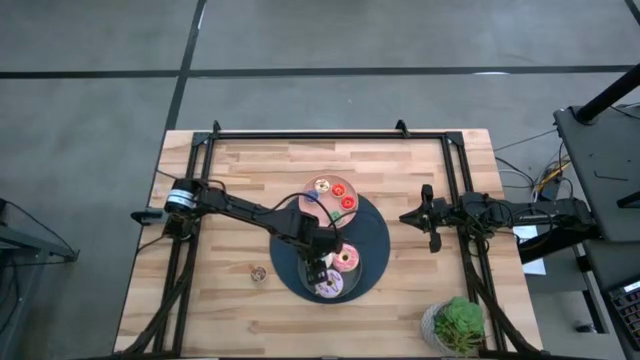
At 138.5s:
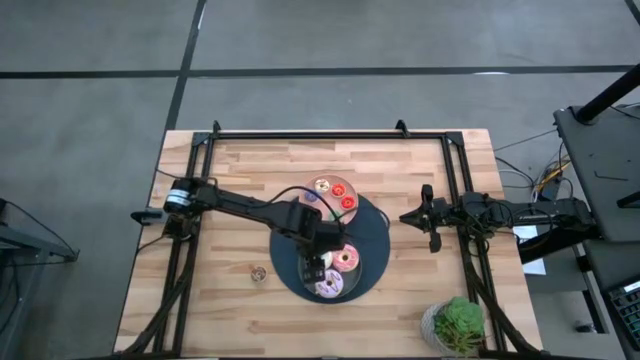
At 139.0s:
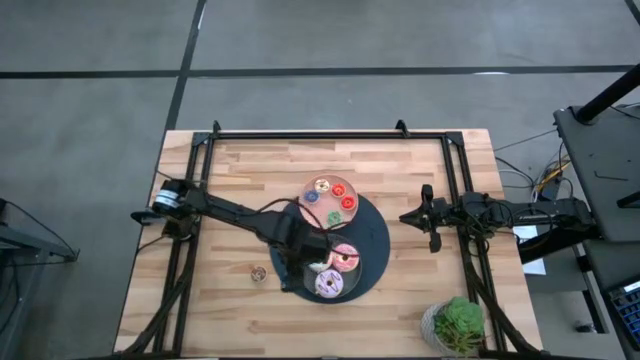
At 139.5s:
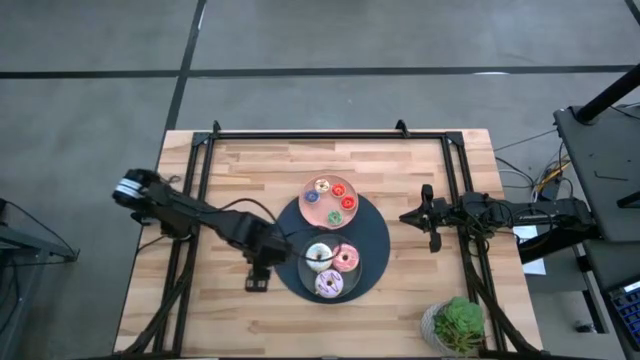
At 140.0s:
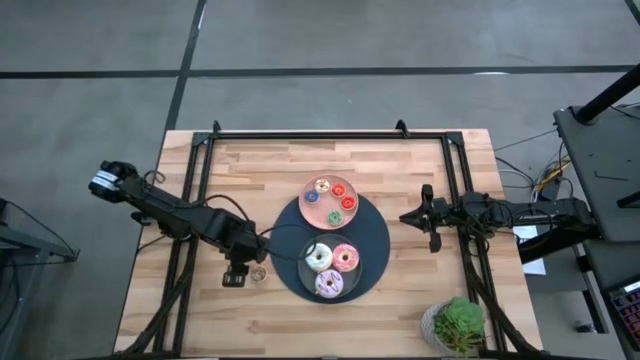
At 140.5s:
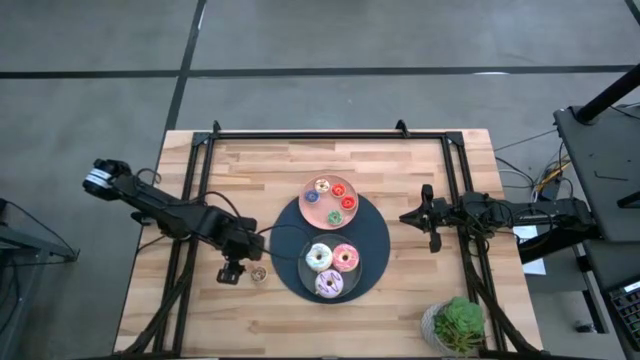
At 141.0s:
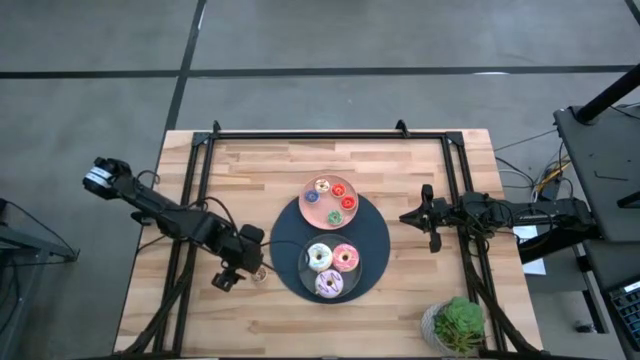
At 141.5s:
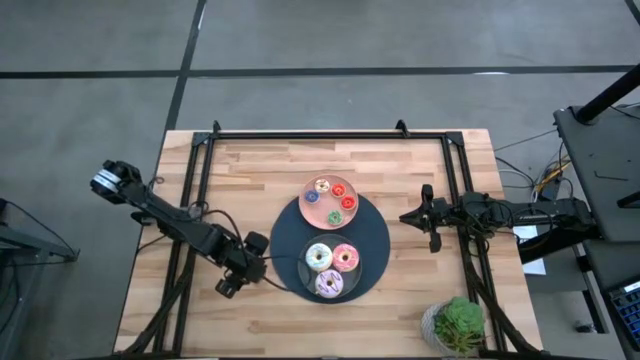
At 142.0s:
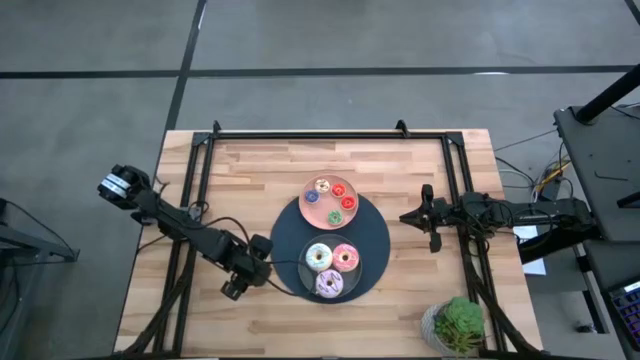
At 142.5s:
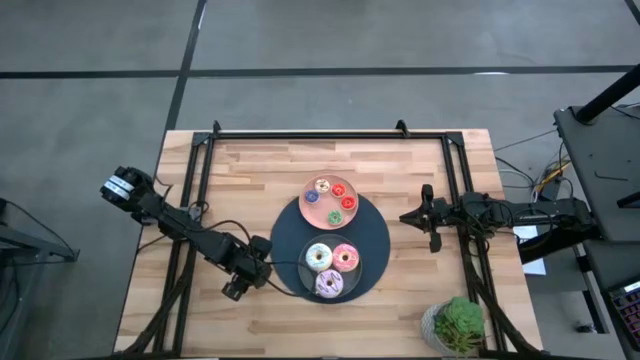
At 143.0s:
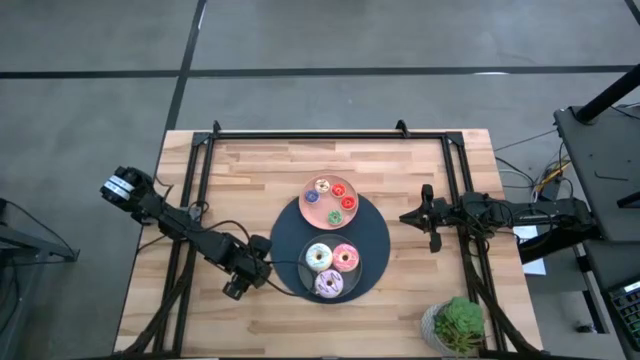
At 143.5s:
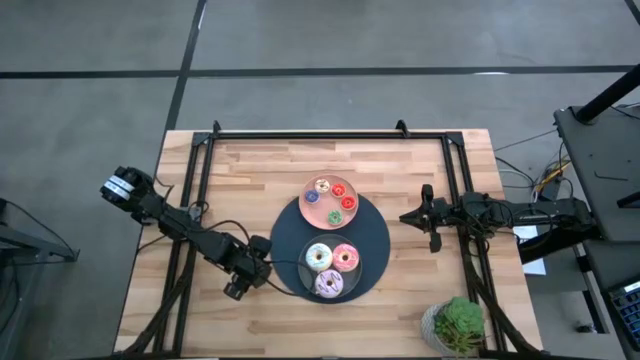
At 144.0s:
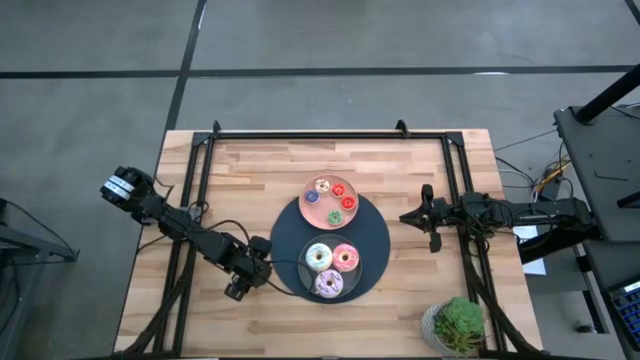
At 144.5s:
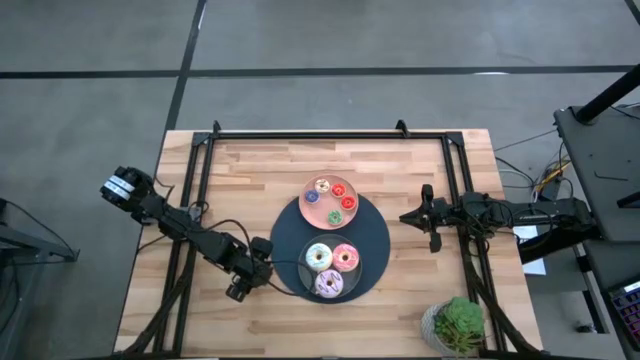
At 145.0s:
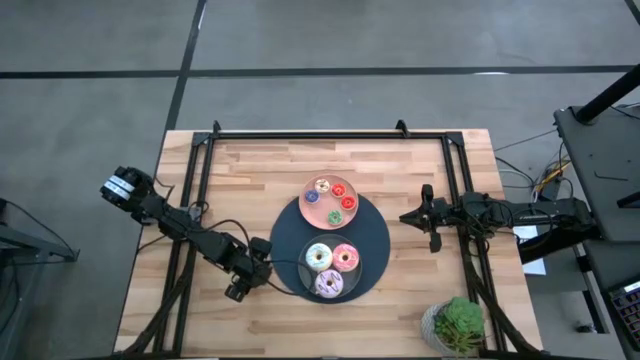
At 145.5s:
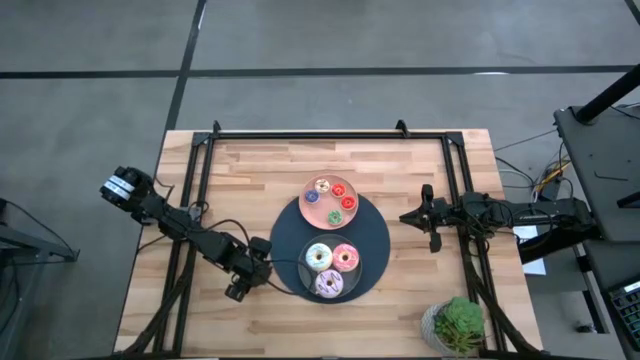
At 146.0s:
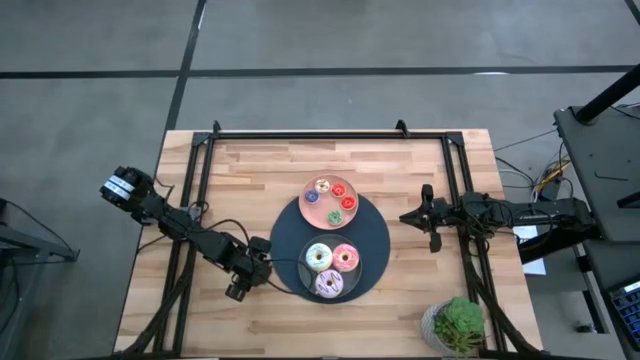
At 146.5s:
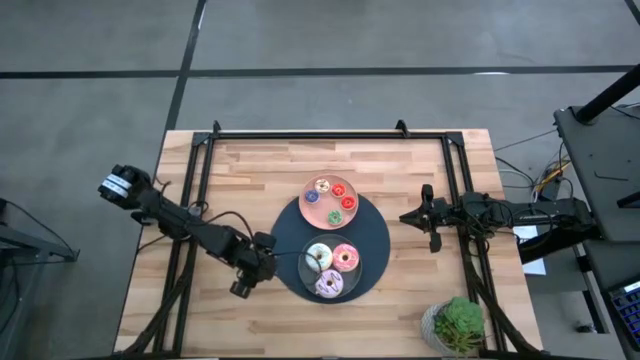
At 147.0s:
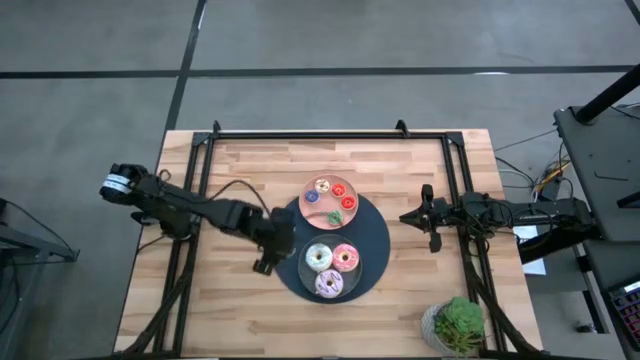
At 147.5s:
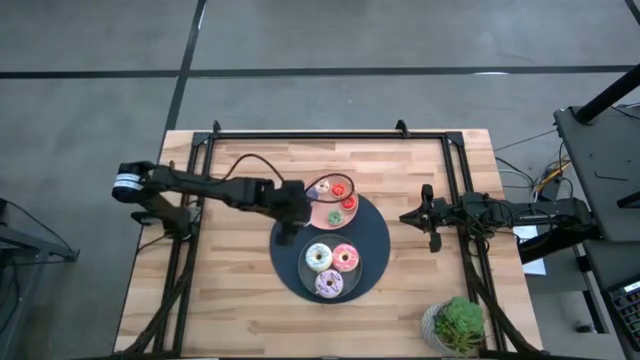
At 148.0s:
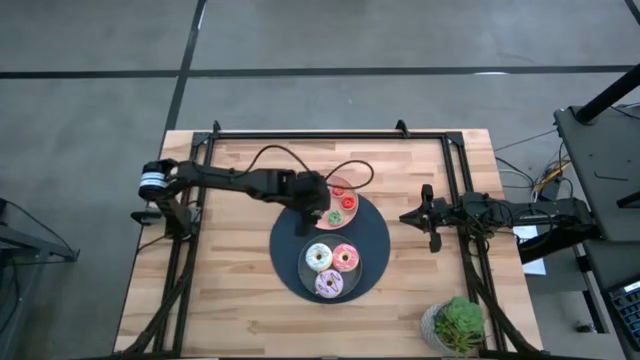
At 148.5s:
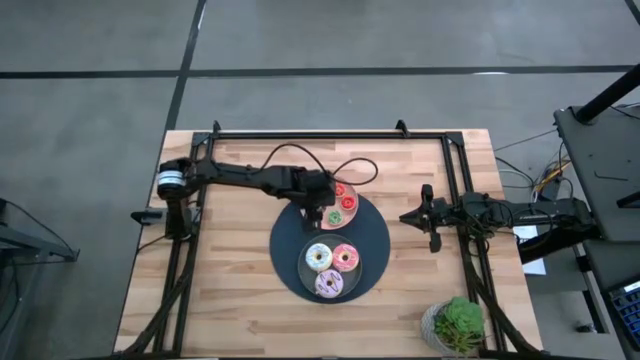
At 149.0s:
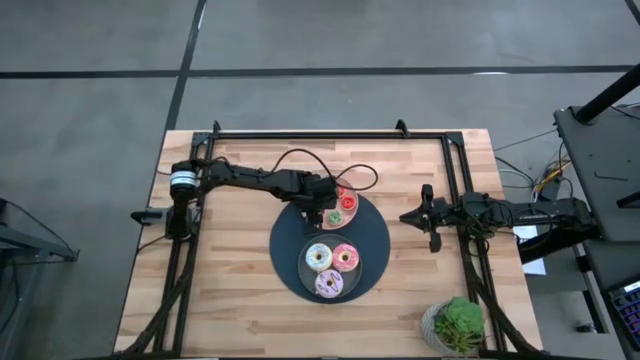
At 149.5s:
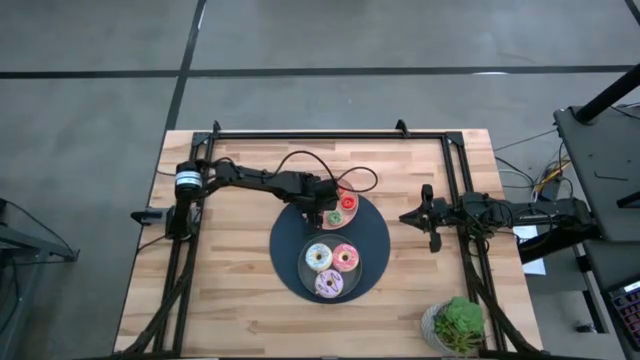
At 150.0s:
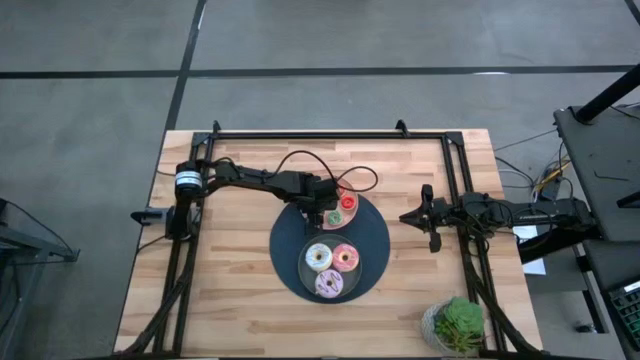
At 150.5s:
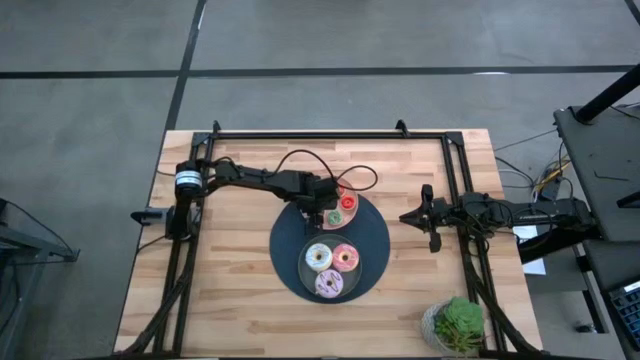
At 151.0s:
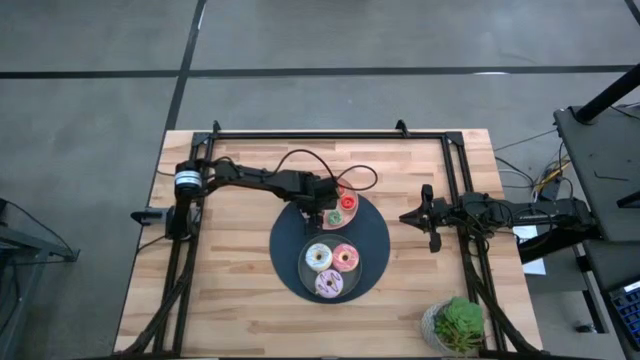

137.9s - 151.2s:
Task: Pick & Place donuts
Put the small brown donut on the pink plate

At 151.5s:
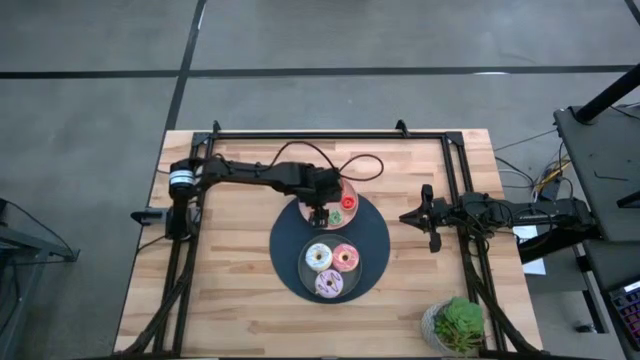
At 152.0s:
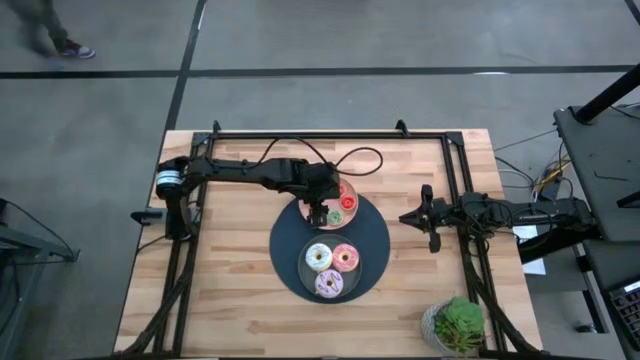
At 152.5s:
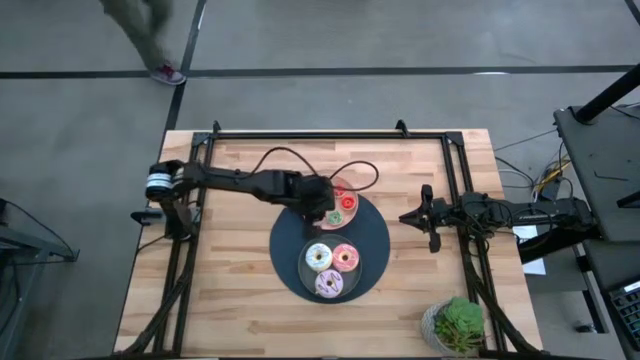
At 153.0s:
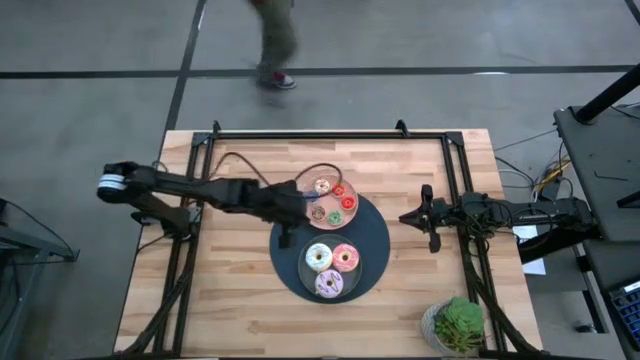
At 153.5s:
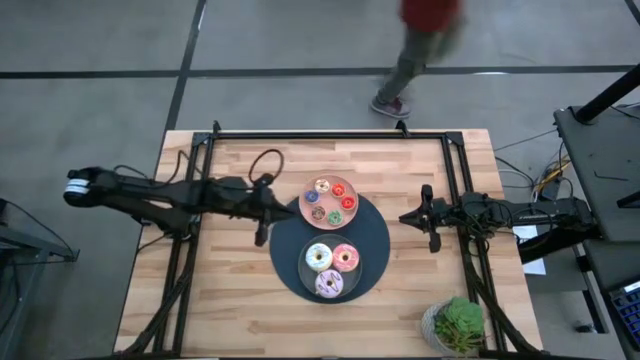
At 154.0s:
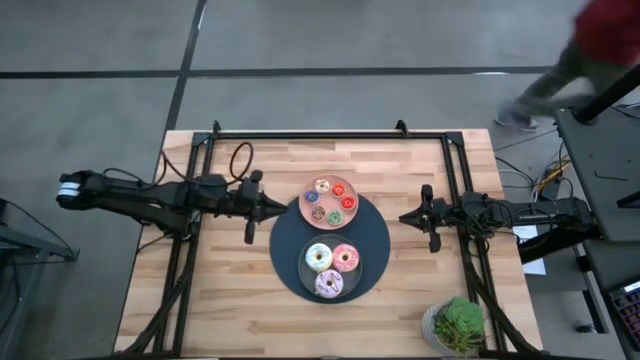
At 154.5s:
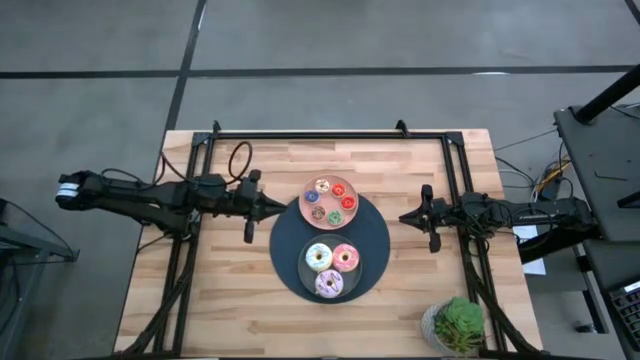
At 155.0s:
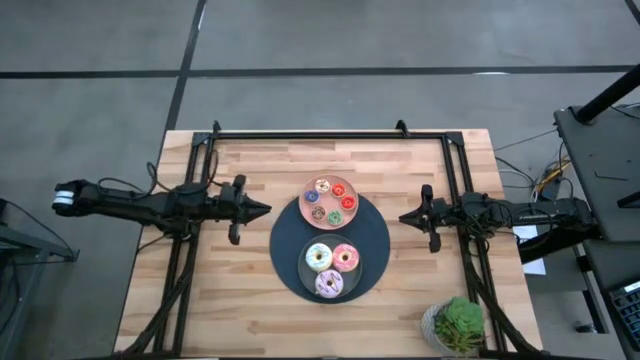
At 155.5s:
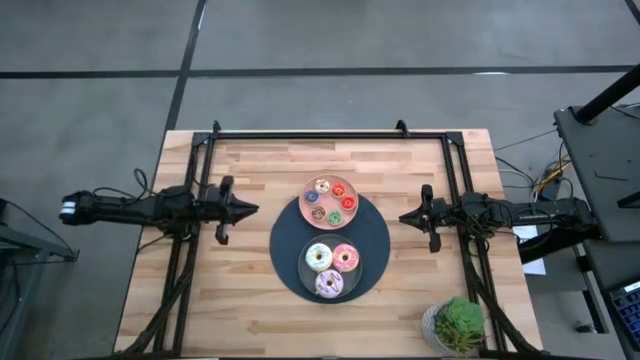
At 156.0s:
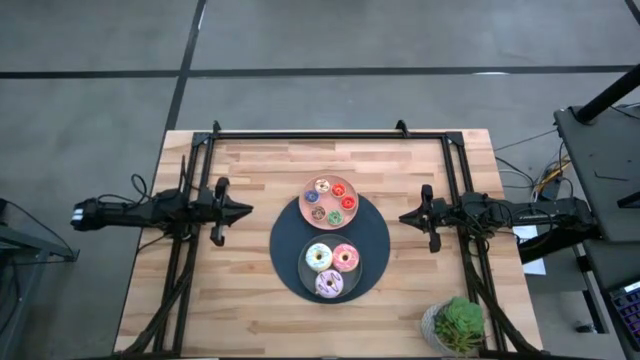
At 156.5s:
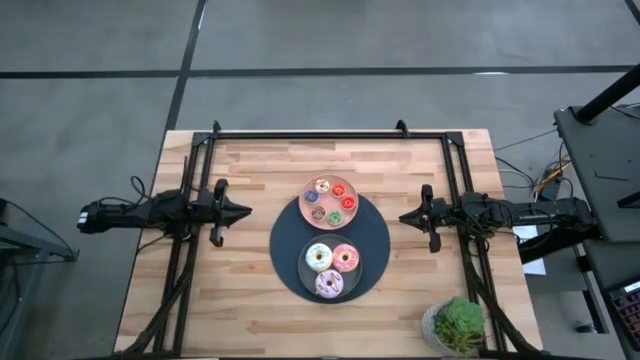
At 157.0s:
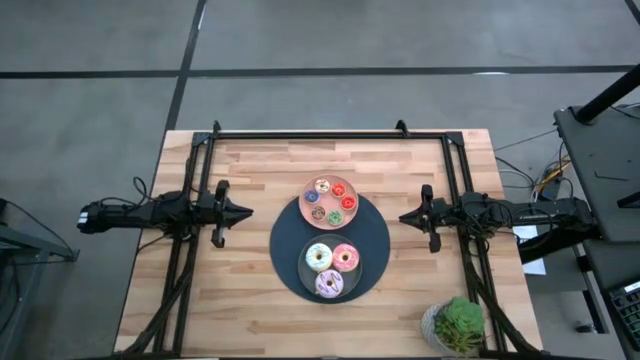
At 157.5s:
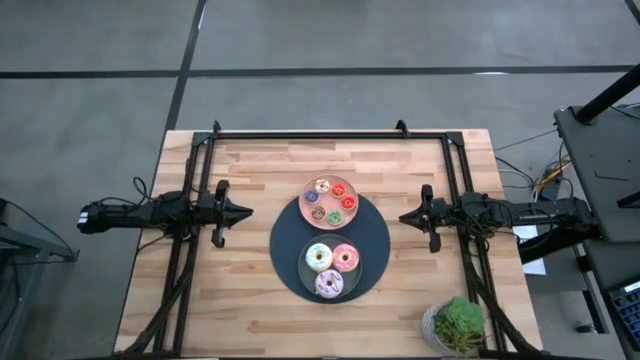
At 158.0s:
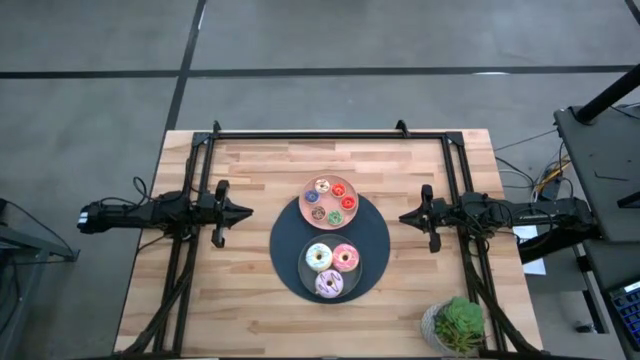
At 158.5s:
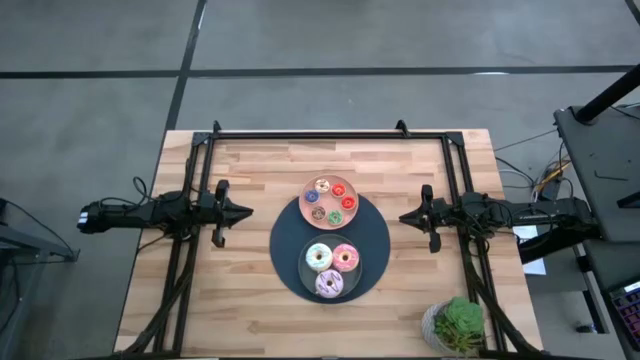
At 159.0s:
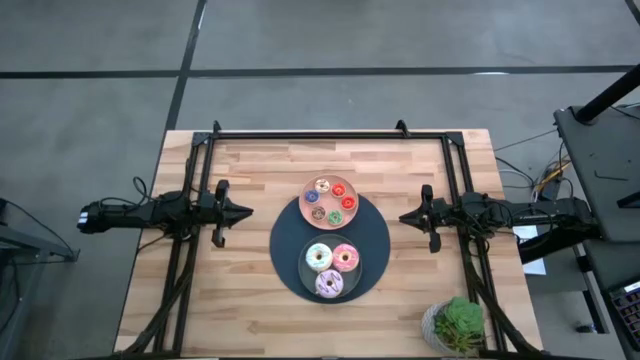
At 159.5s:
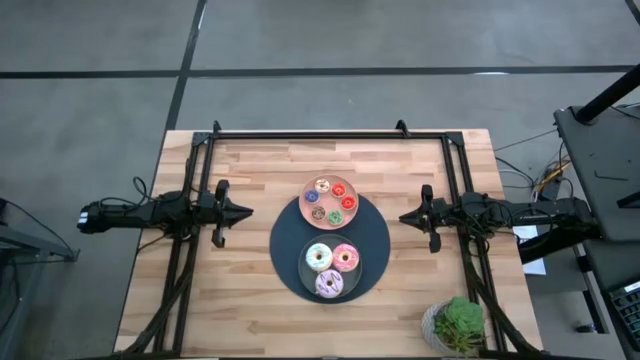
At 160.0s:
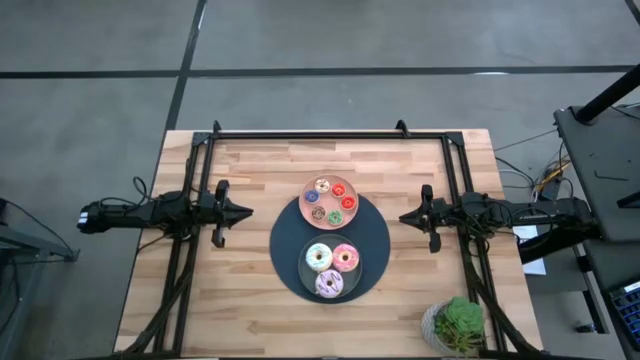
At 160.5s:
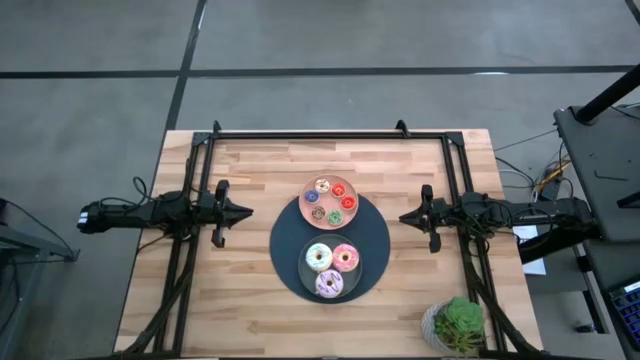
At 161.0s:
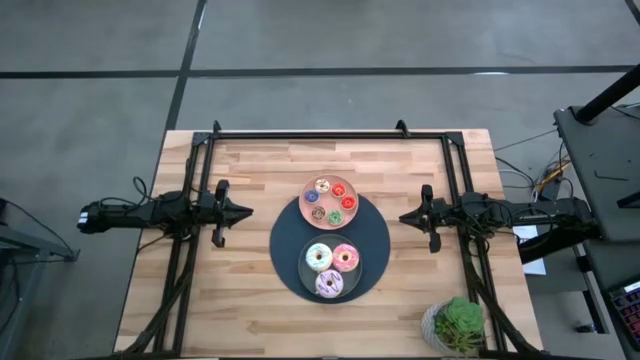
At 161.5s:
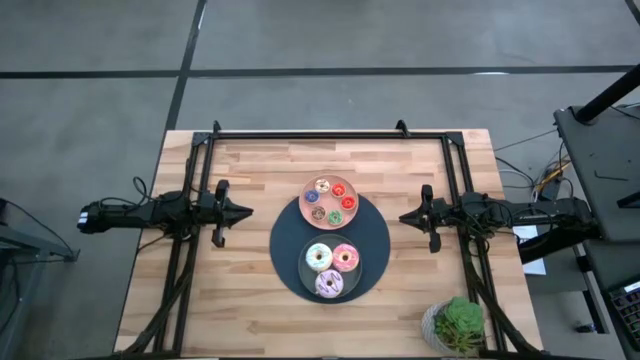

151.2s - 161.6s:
Return to Home Position
